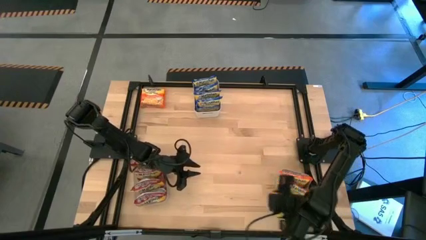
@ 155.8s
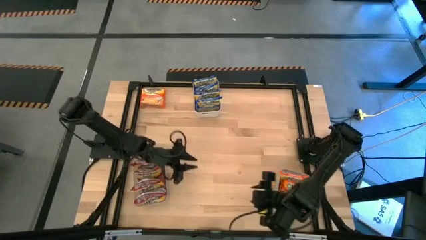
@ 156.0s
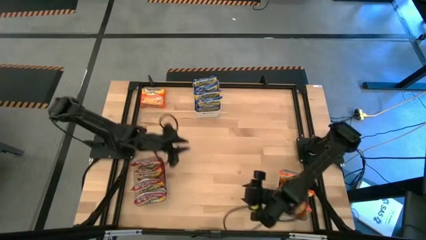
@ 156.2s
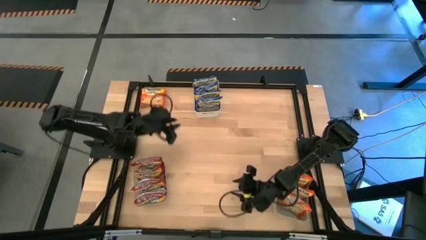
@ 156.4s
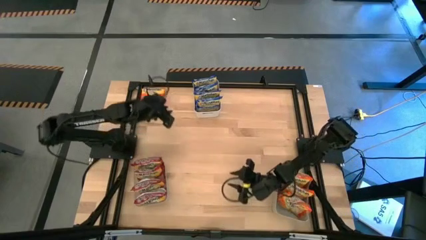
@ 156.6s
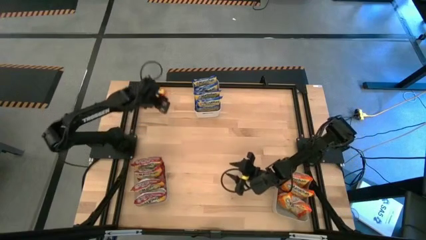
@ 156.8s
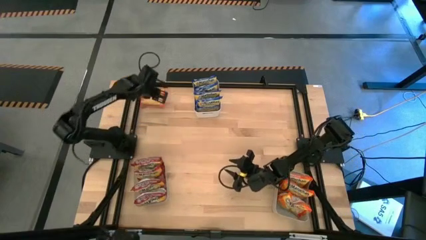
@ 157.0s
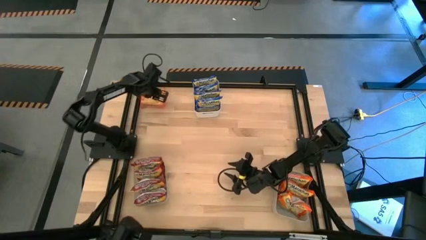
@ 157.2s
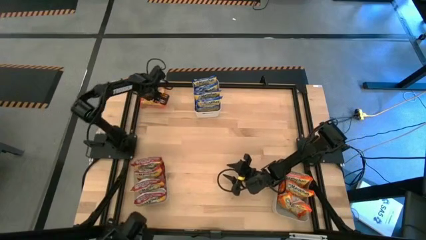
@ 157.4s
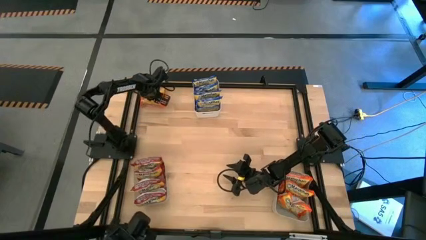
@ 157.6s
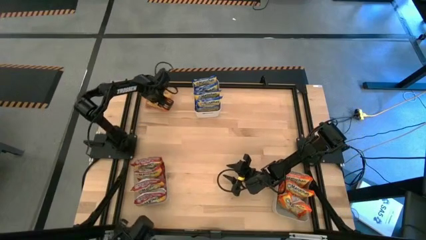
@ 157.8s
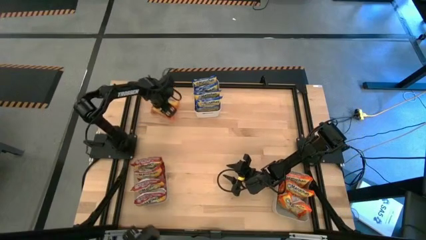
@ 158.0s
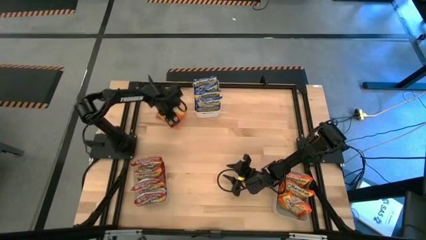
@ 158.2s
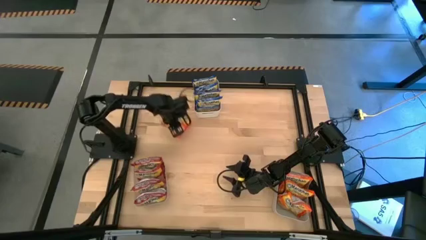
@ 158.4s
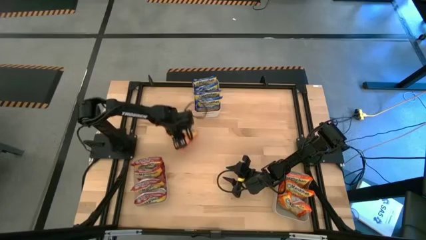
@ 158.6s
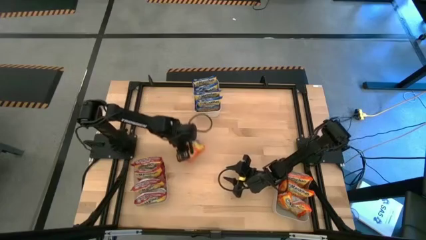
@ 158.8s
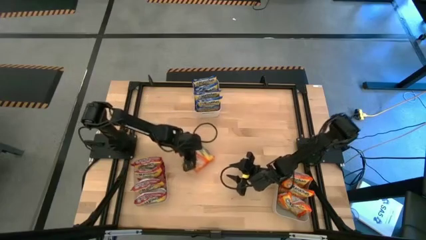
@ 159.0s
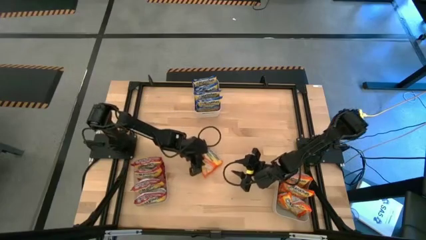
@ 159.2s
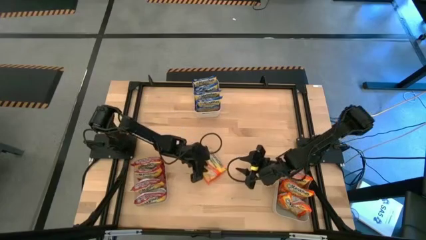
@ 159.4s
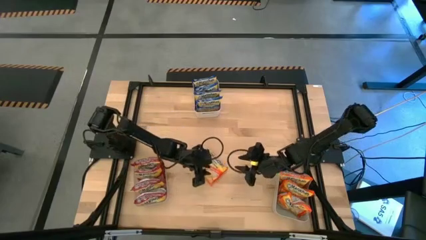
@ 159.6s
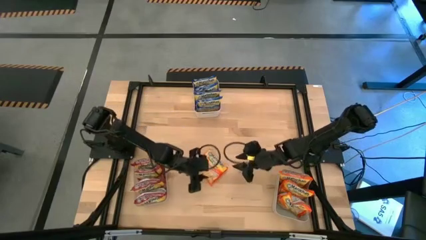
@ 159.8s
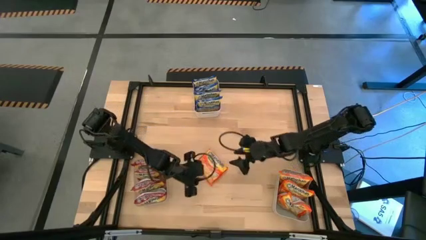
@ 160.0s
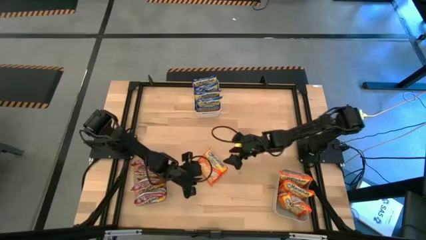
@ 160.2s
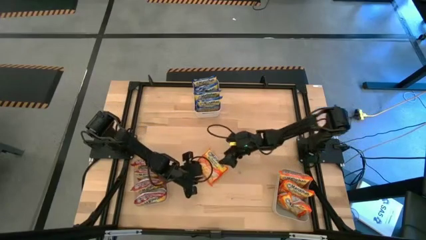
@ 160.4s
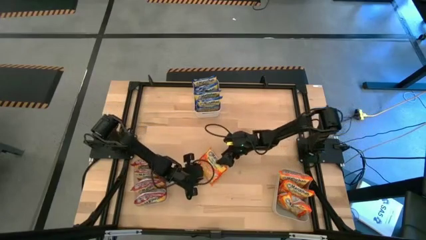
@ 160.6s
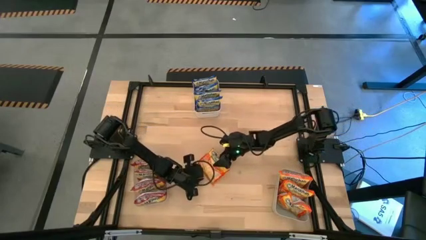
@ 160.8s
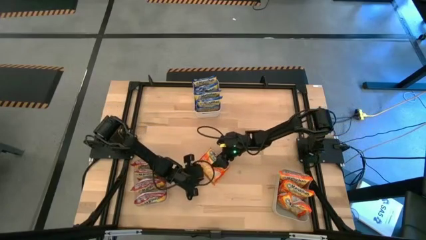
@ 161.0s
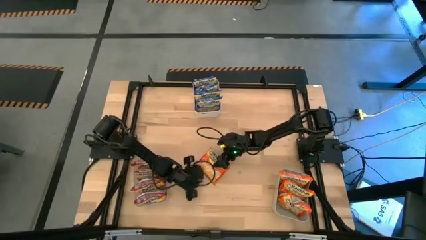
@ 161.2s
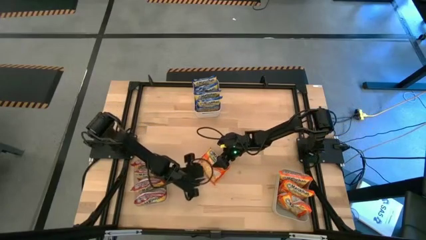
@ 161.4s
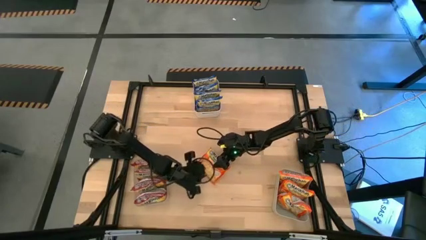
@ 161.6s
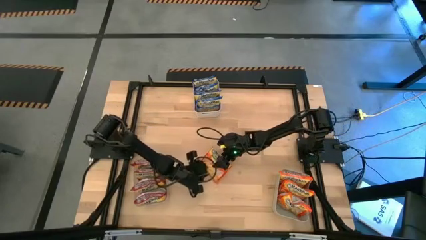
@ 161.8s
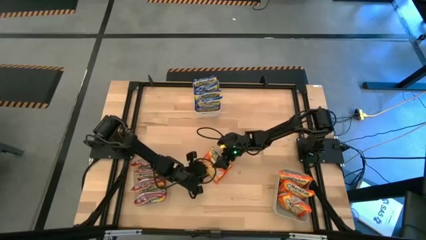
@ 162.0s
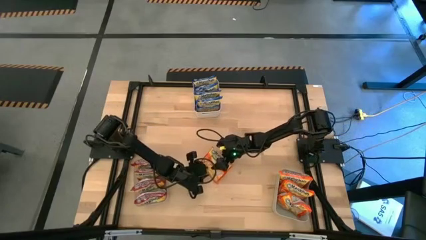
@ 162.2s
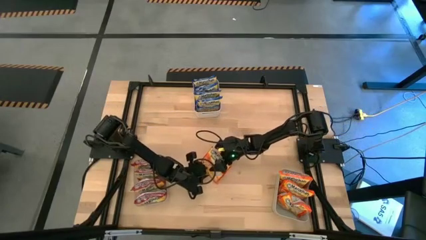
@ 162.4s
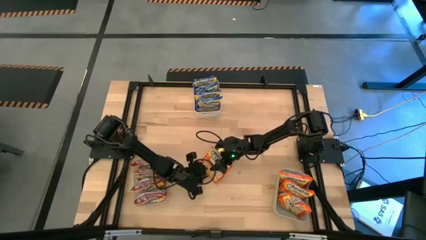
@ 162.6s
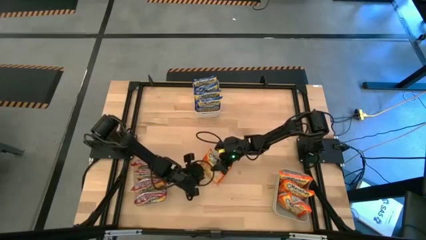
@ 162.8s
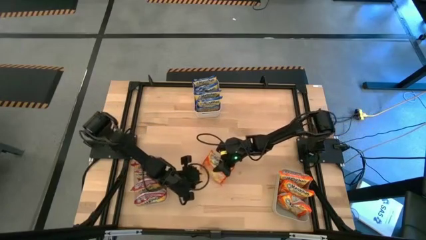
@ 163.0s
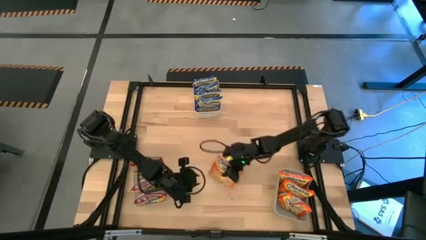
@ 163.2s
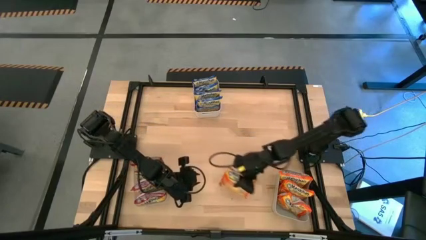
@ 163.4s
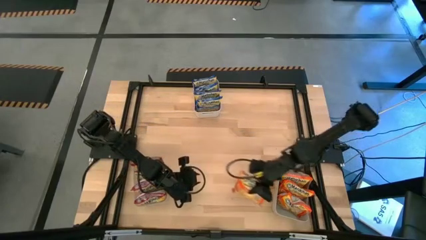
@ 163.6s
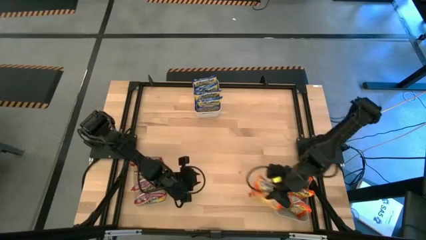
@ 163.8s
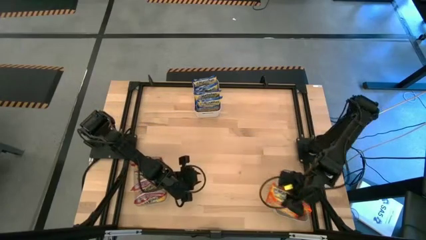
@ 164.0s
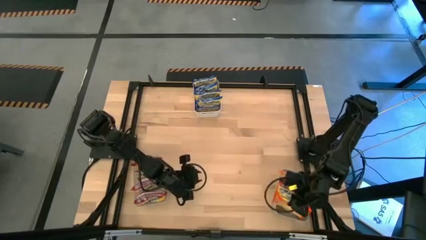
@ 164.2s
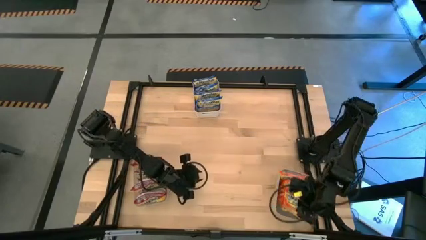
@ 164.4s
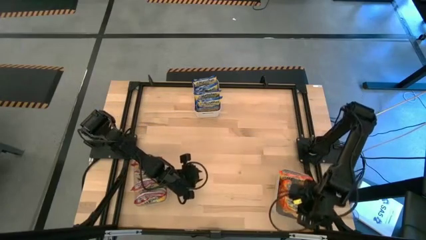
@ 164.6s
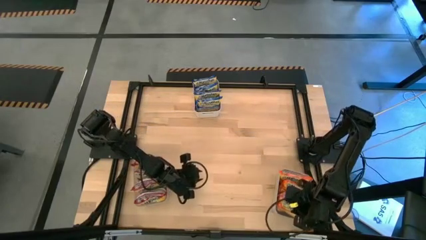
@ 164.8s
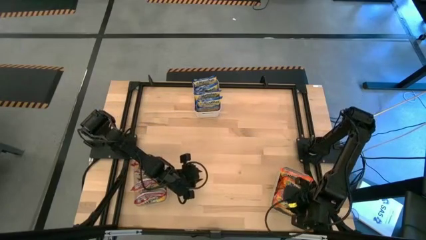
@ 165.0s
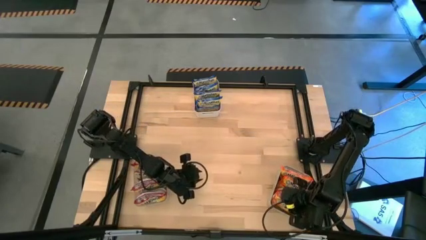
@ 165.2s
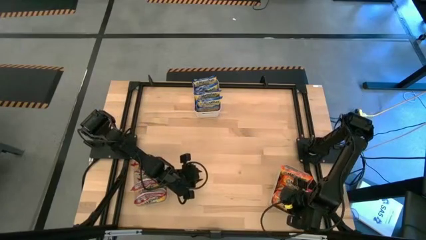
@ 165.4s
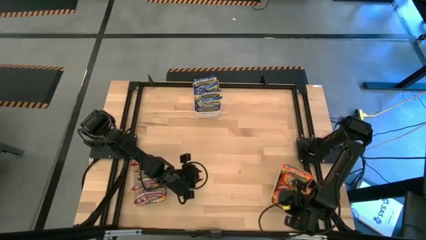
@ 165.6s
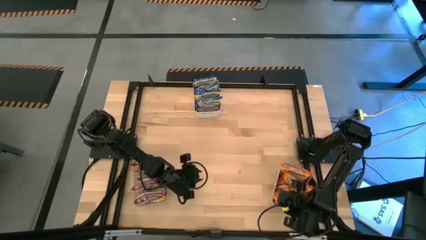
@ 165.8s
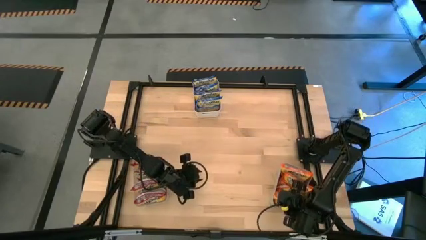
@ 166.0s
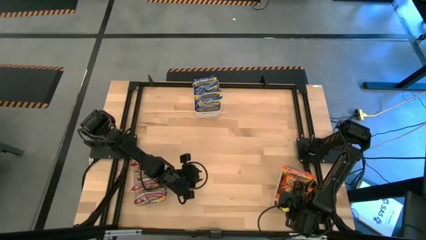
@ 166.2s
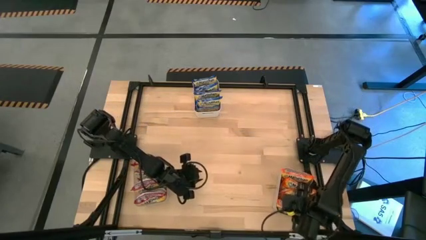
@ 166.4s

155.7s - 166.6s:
Task: Sort Maruchan noodles
Put the orange noodle pack into the gray bin

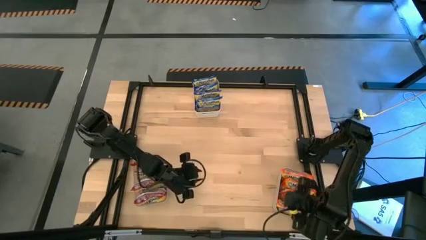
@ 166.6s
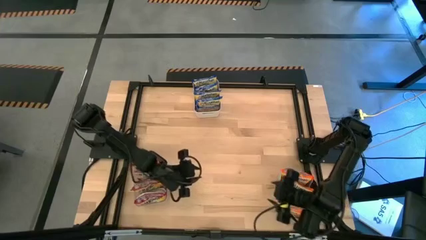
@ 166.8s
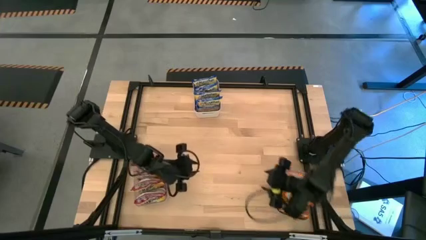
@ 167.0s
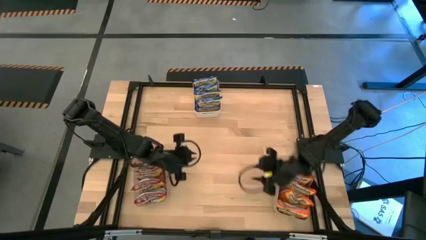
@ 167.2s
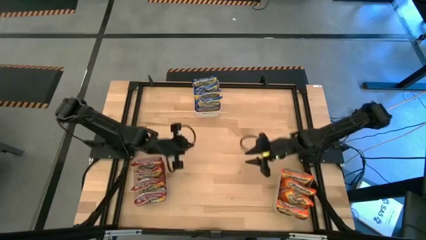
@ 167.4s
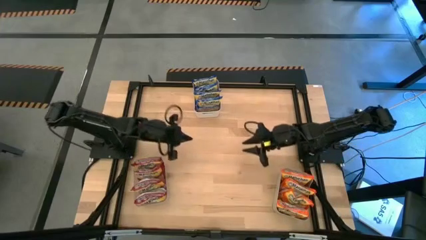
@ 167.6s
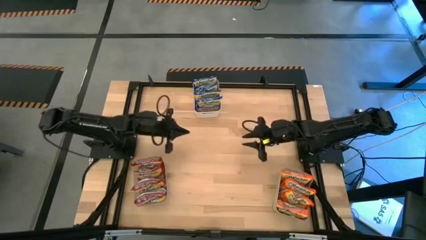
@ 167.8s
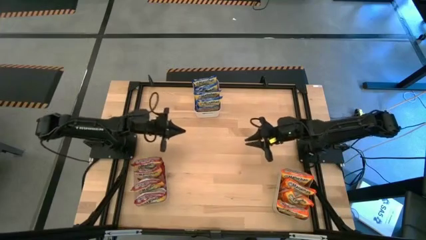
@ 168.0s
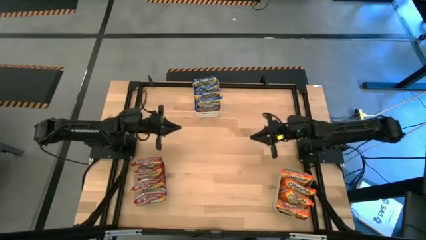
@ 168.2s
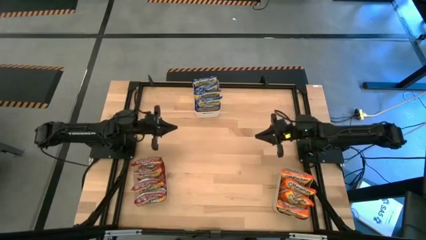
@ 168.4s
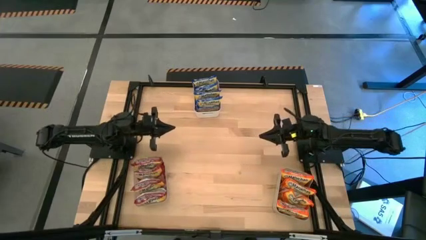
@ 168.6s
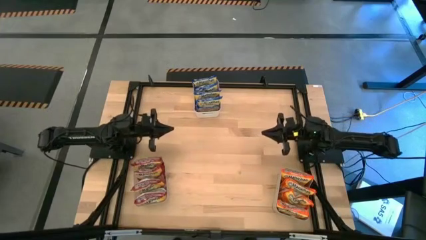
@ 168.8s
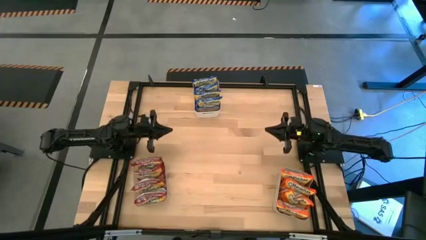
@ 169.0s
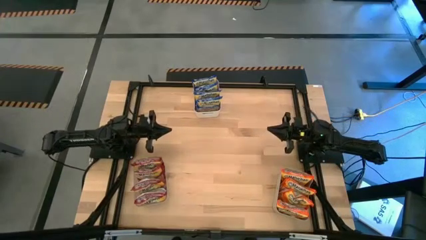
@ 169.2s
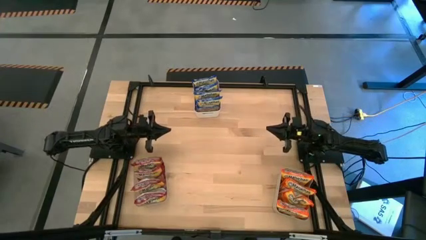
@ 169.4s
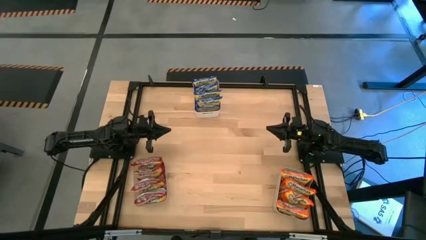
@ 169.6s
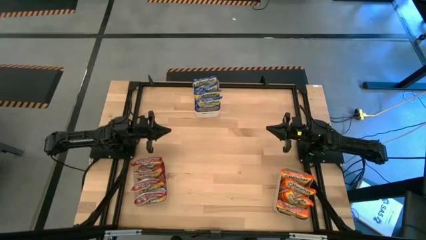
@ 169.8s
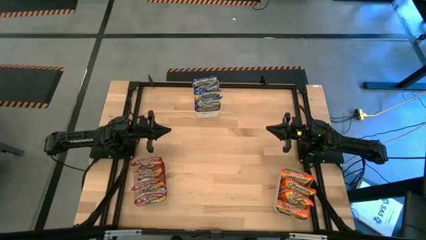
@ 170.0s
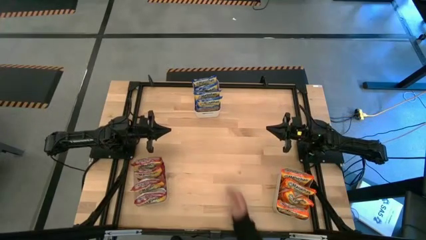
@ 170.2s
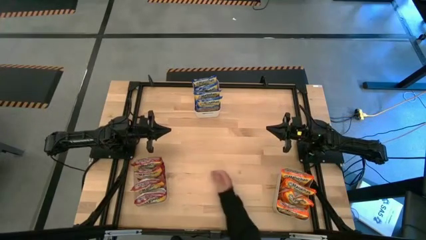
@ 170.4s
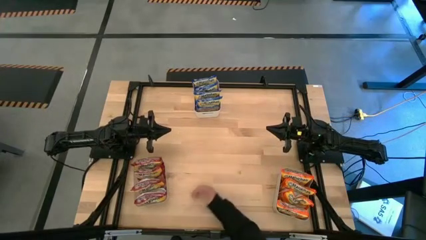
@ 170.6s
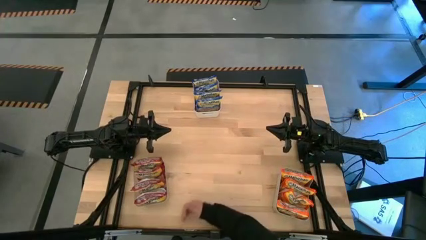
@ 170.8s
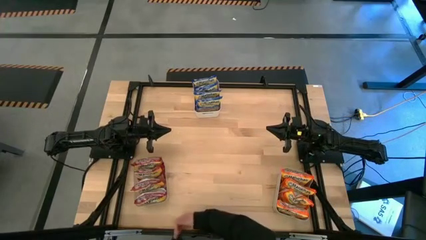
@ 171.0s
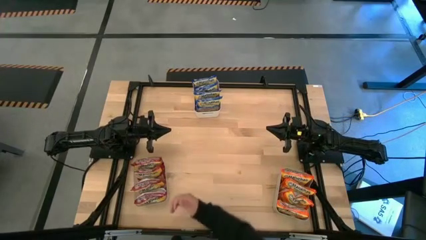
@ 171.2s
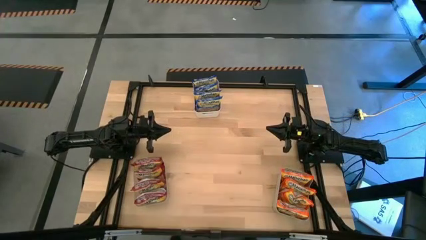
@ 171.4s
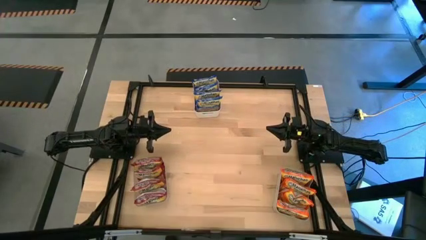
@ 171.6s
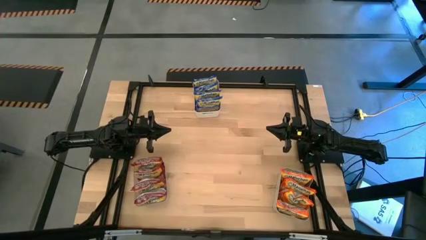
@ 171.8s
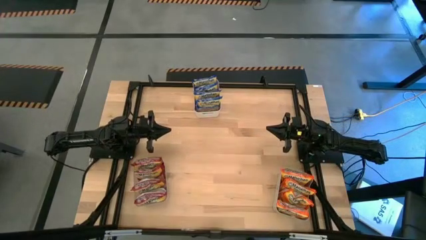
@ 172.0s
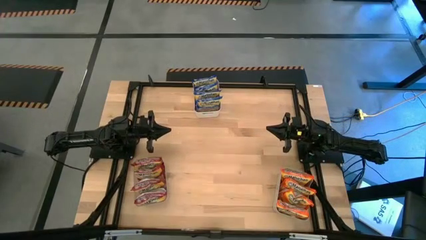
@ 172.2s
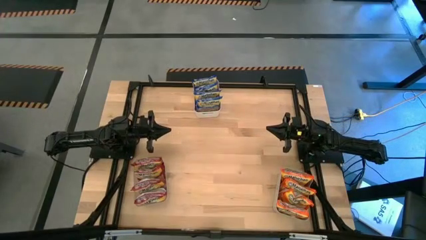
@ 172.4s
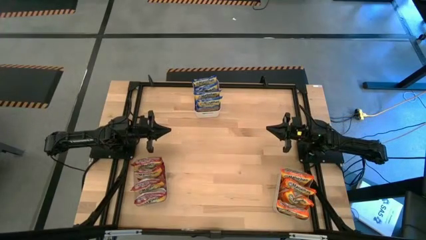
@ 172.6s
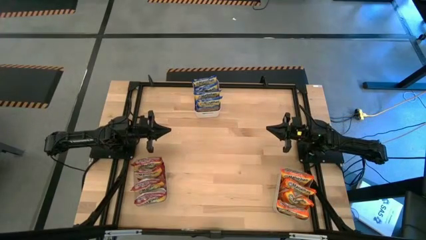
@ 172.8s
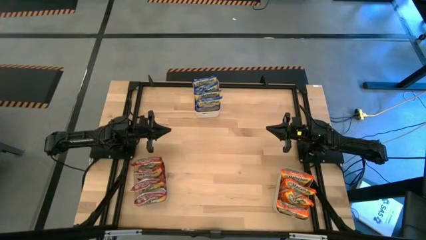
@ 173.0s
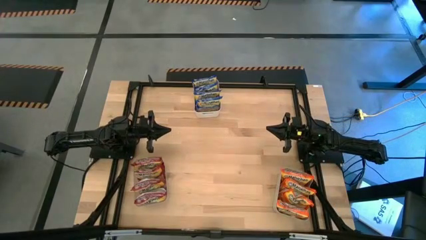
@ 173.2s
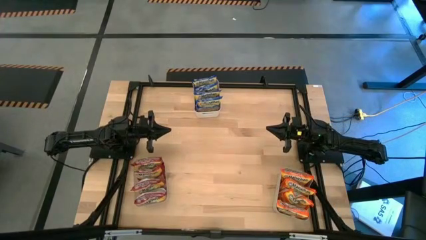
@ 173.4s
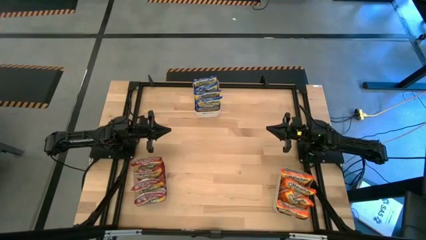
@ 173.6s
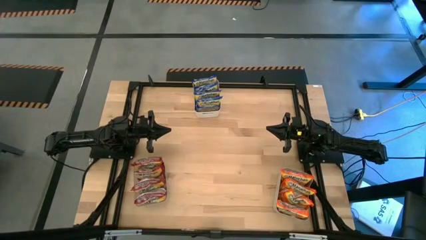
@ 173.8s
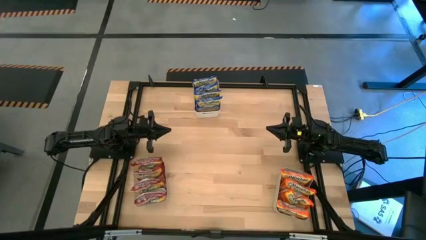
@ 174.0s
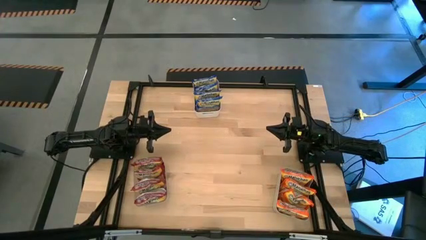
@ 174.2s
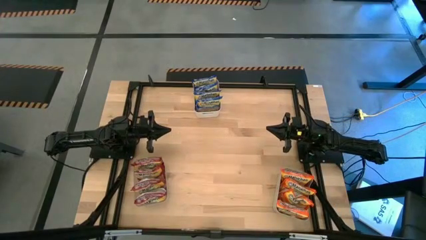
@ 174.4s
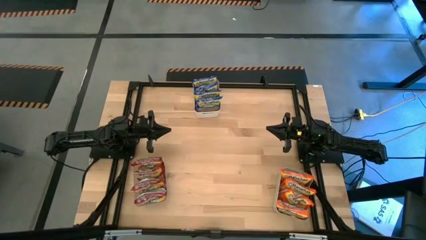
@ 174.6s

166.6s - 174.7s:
Return to Home Position
